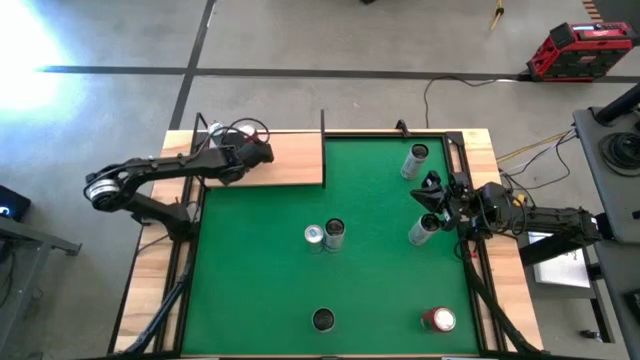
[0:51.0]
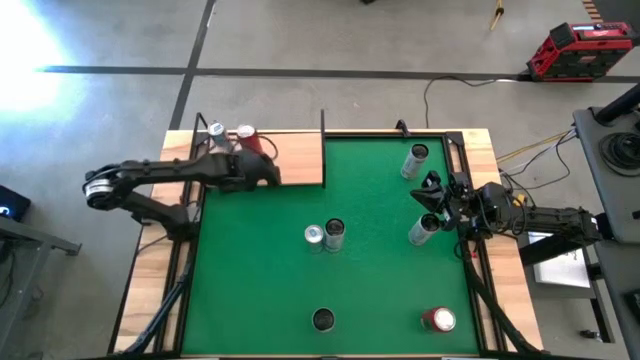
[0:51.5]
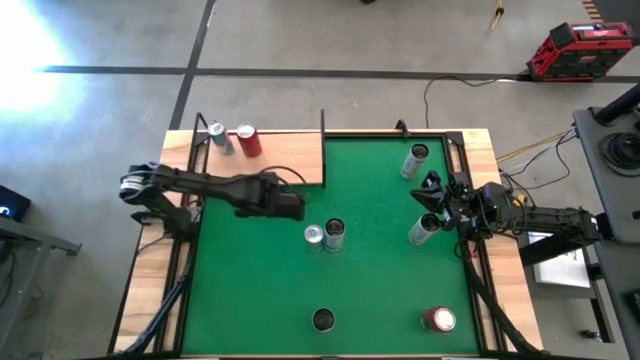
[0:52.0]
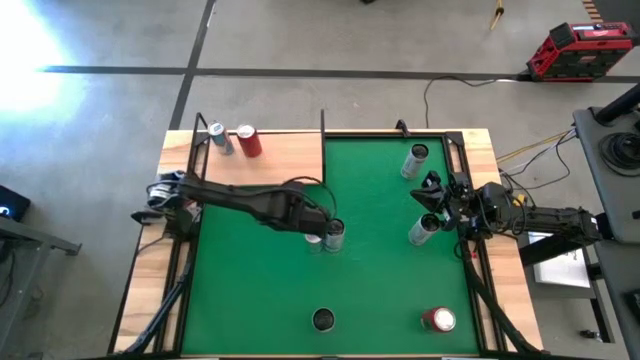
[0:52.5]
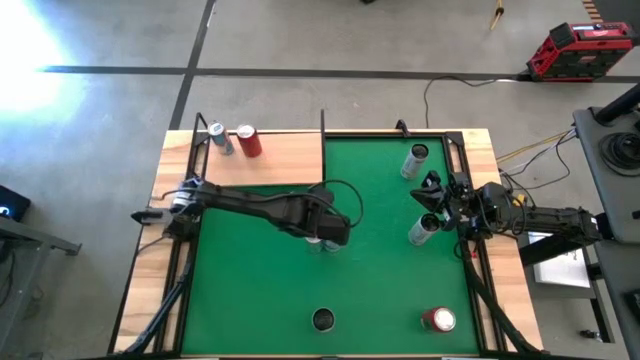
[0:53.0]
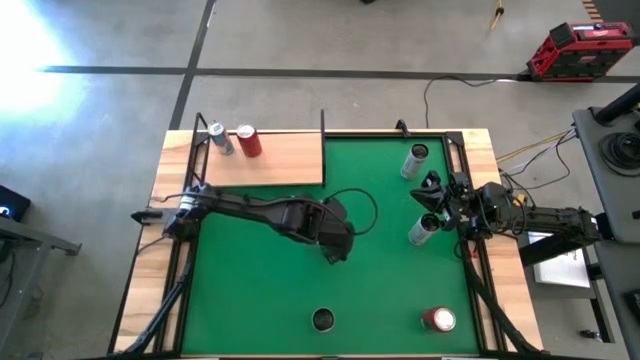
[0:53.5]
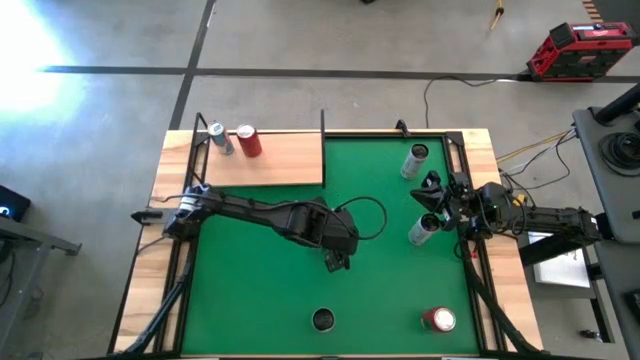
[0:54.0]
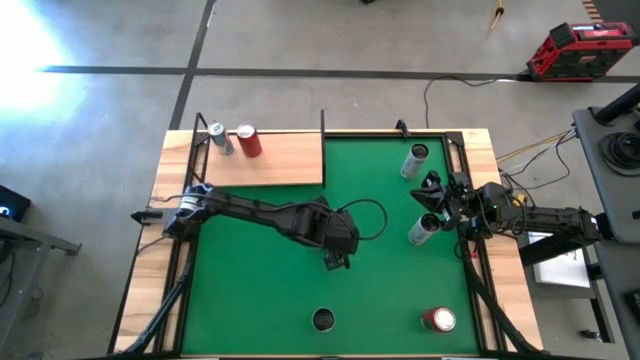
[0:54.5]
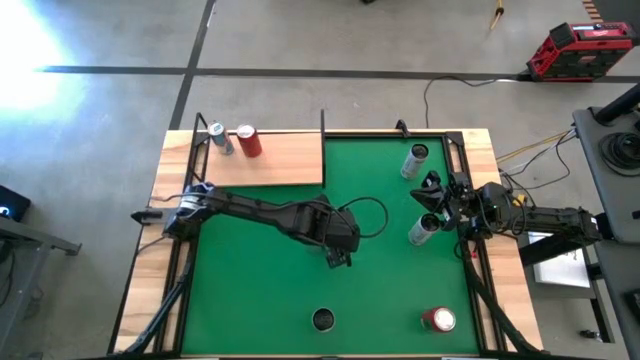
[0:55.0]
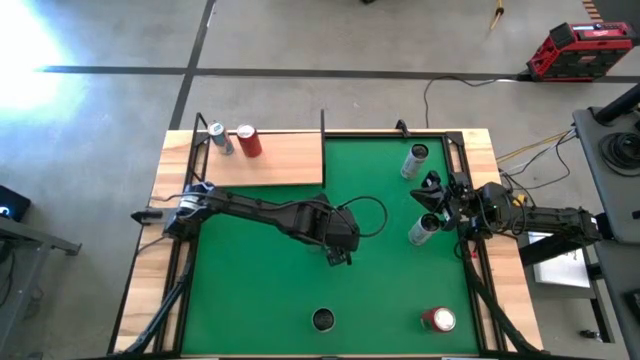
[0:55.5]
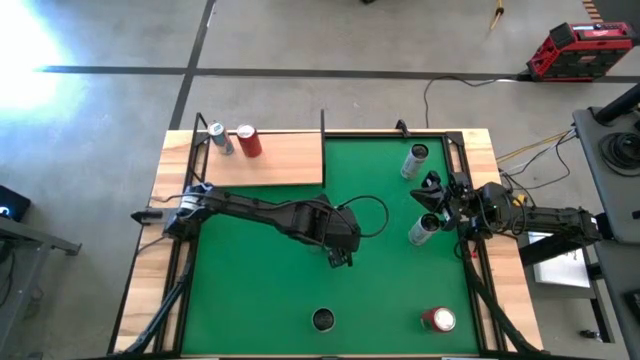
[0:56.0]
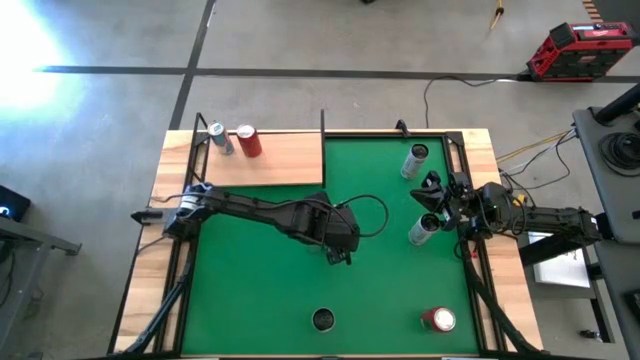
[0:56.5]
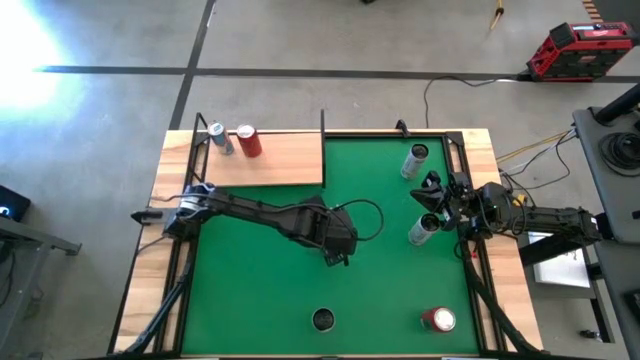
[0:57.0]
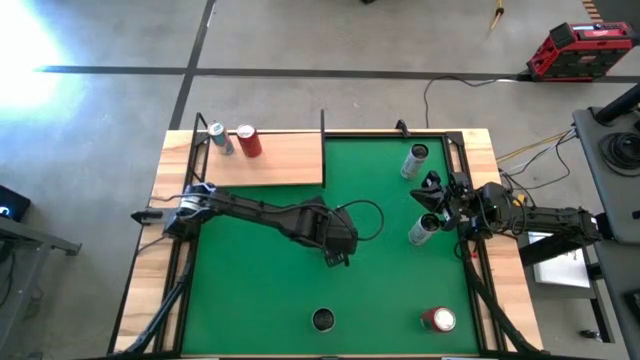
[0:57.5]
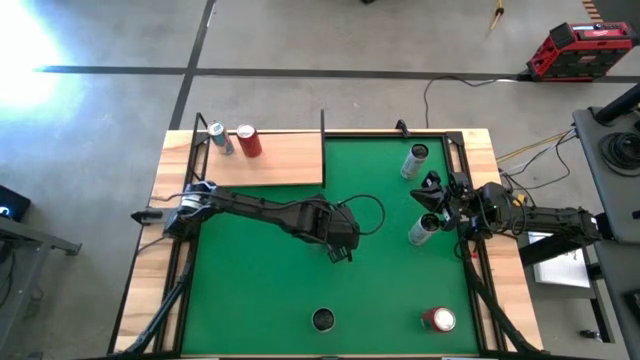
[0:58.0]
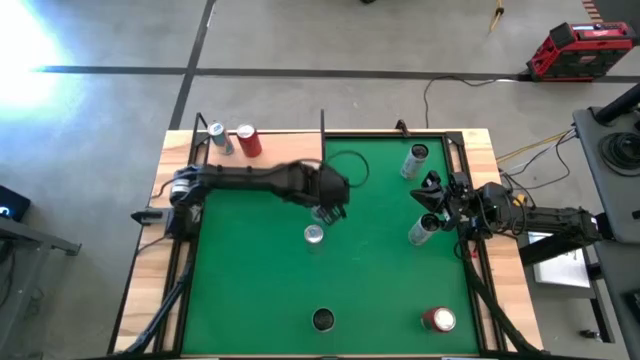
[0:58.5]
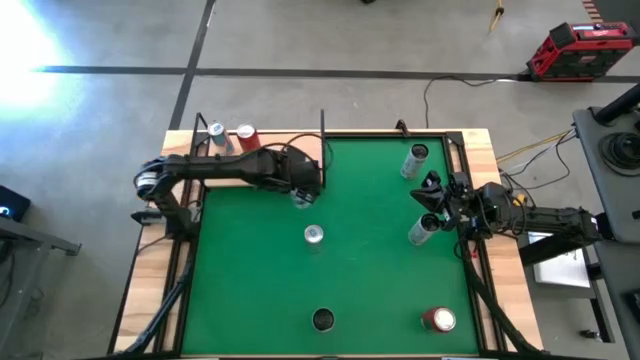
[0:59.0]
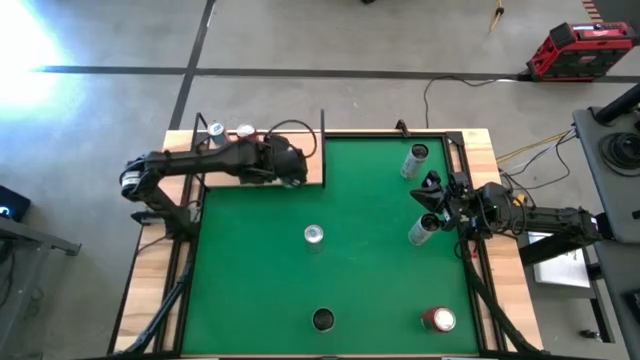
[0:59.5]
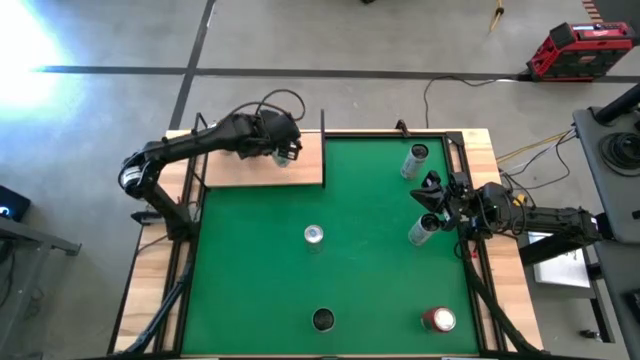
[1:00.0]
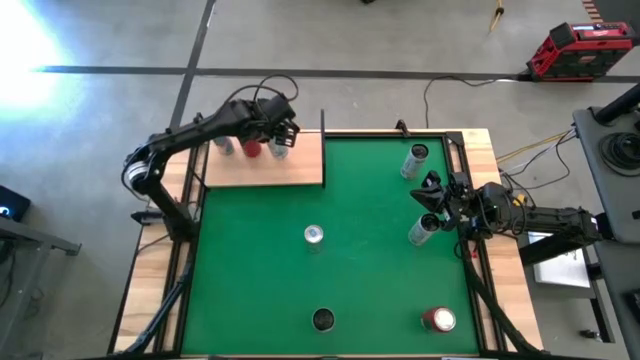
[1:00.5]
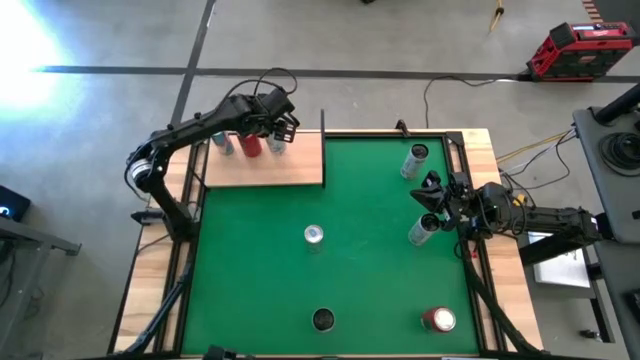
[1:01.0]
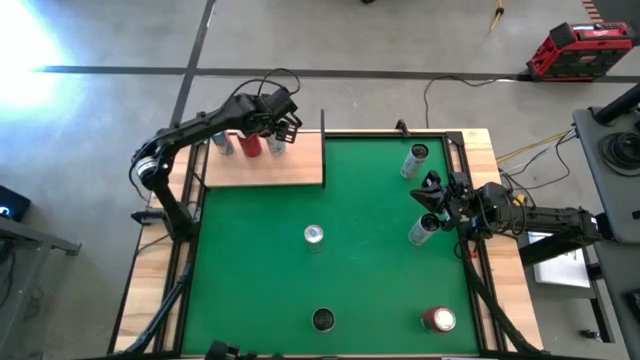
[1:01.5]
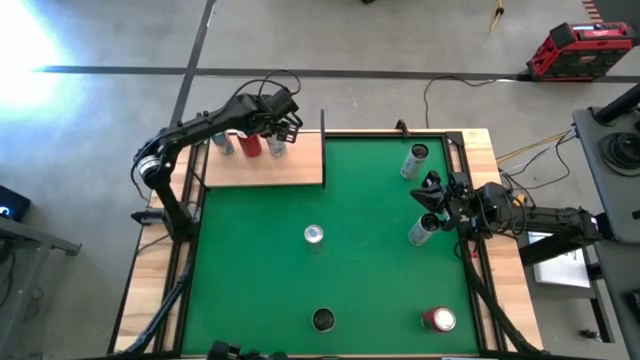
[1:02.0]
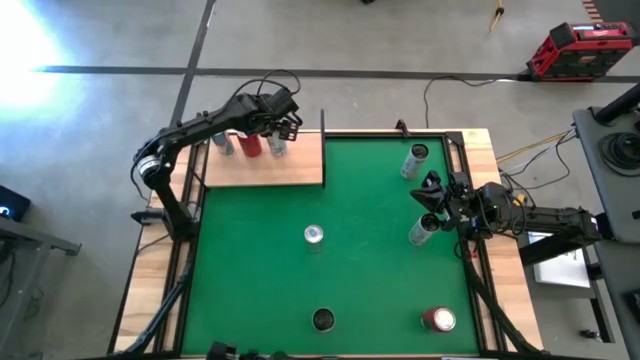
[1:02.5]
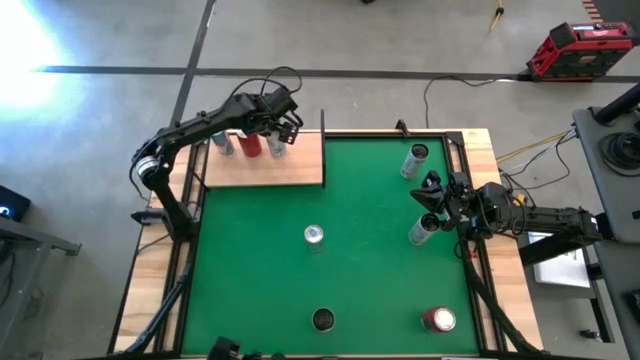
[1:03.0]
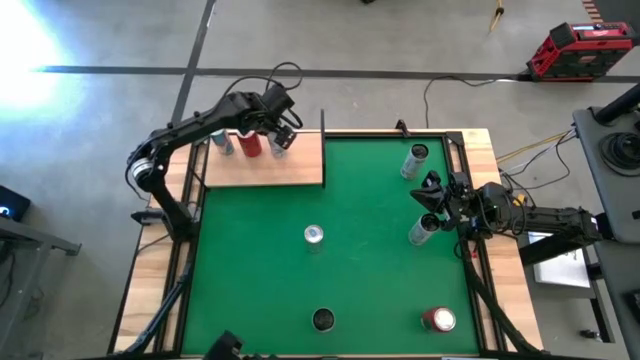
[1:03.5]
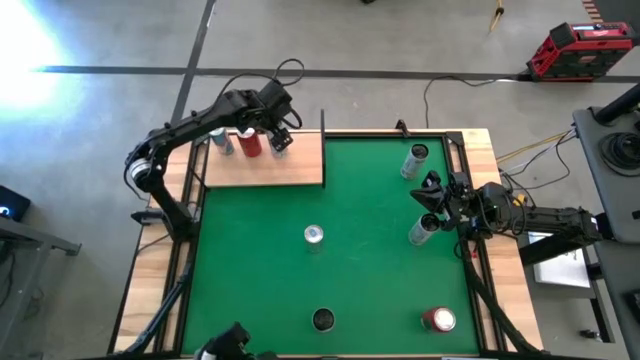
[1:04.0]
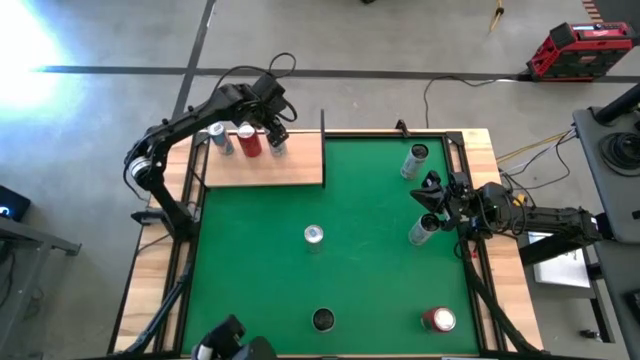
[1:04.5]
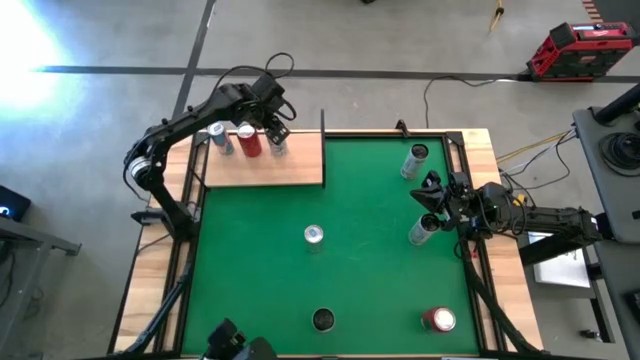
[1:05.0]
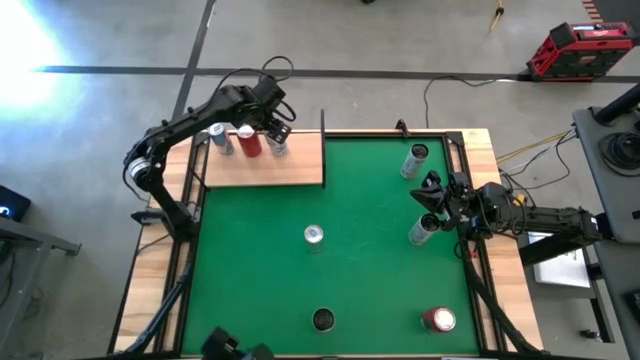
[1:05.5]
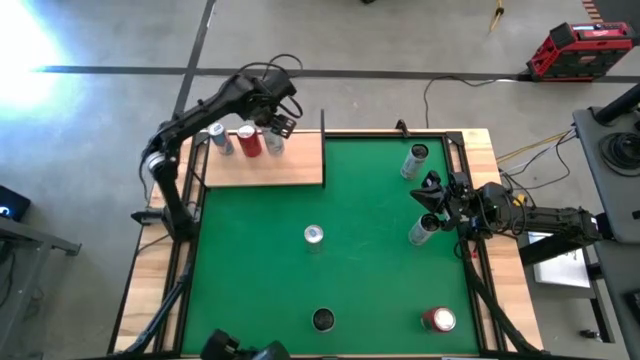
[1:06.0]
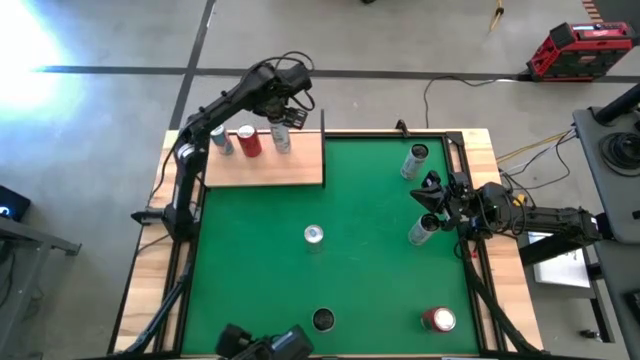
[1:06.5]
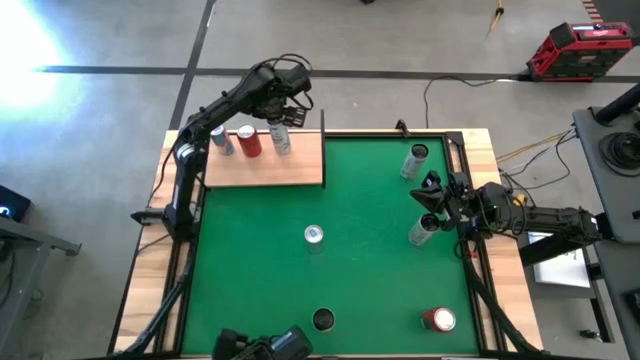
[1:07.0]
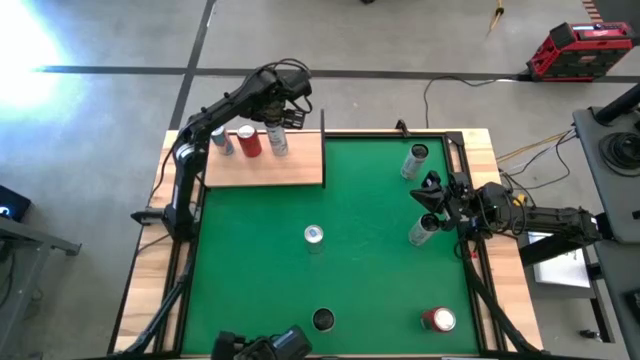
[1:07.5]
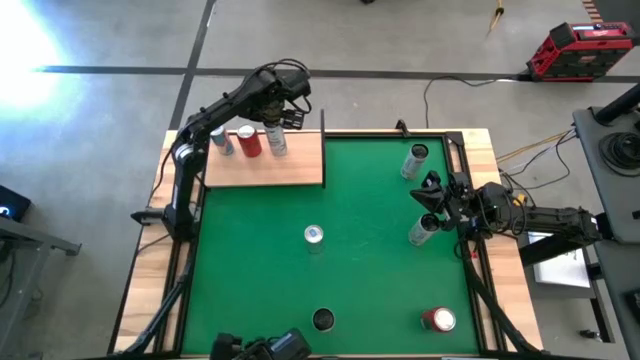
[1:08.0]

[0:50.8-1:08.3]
Task: Place canned beverage on shelf
Put the white blue soda can on the shelf

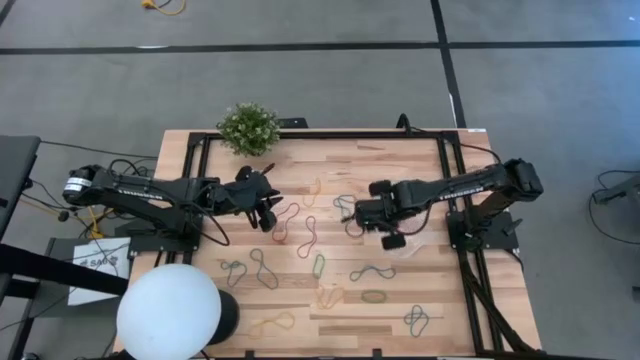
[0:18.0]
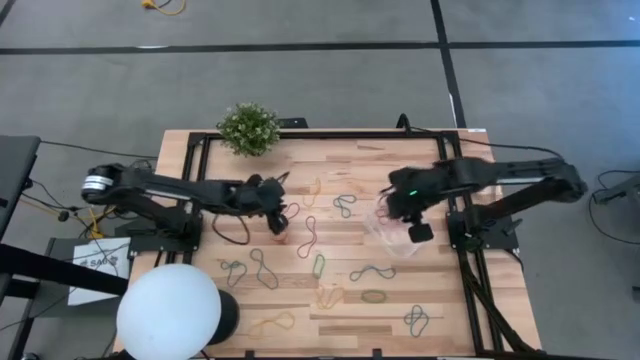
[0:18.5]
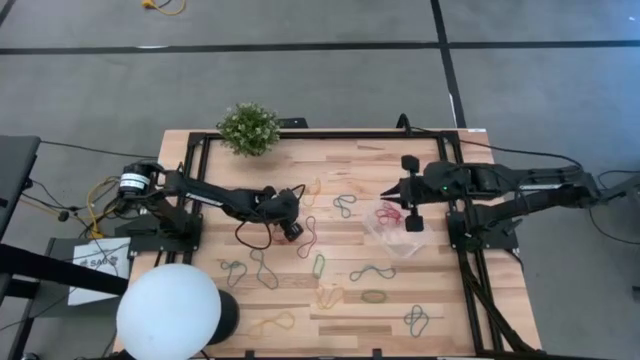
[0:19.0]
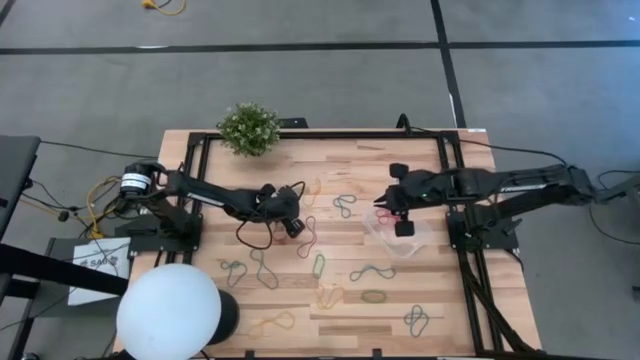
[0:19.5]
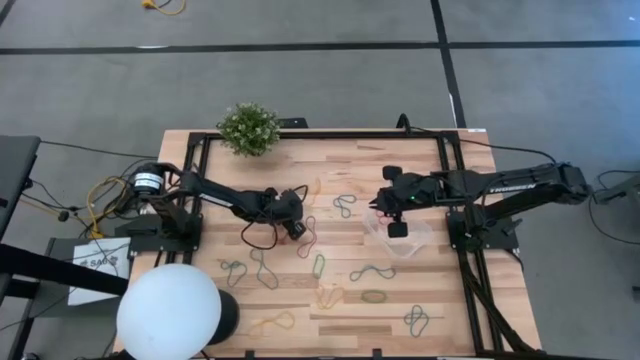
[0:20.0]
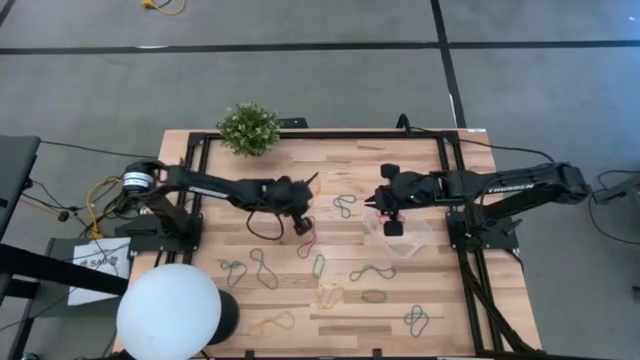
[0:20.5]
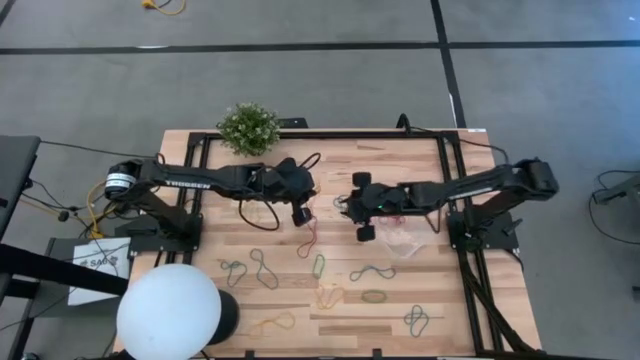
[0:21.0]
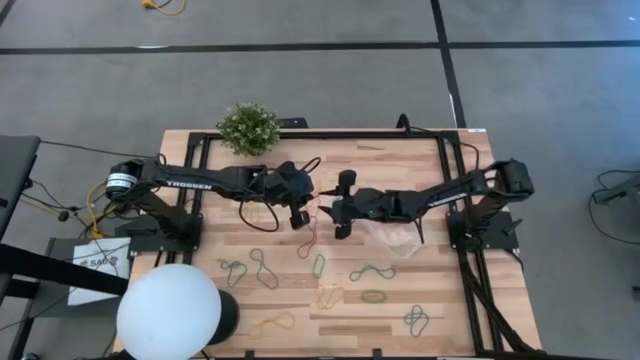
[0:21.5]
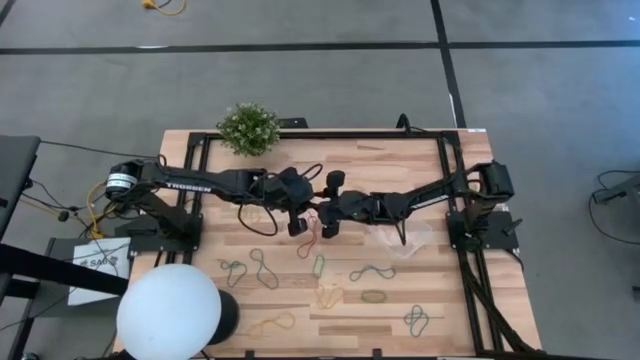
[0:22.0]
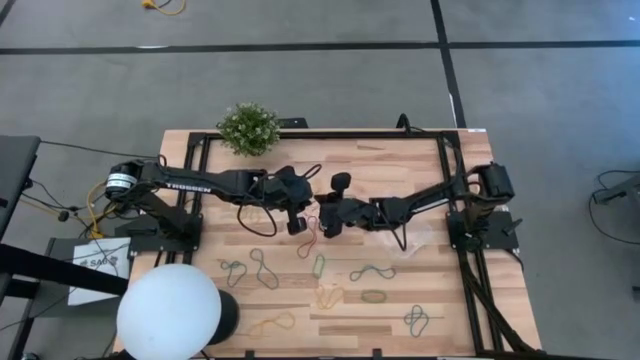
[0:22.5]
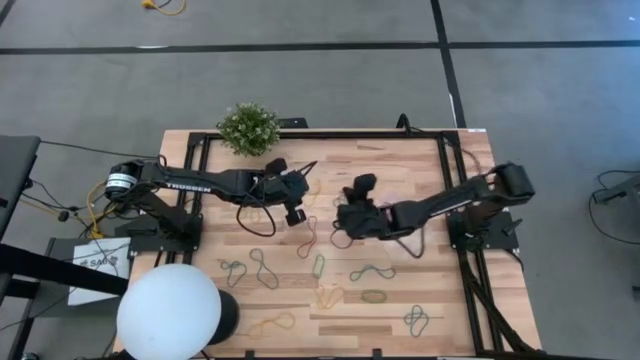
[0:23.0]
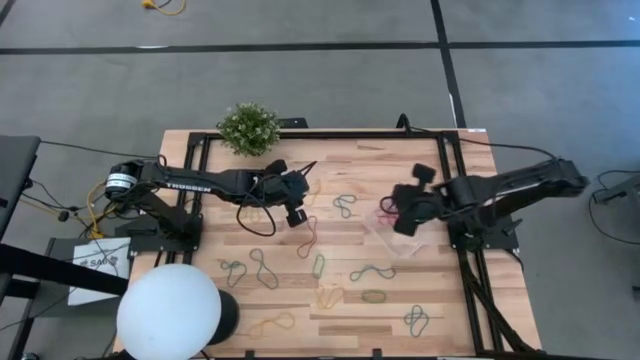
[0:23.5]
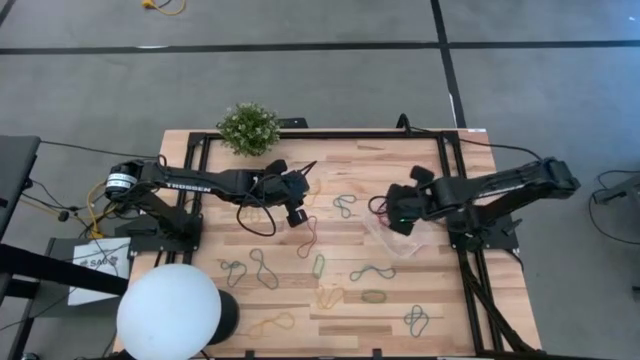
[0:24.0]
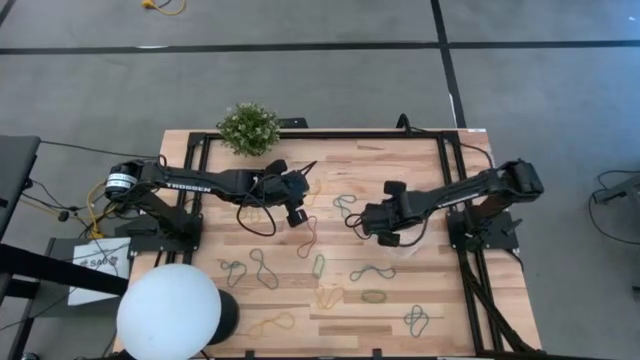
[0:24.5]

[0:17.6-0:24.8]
Task: Pick and place items into bin
Put the red rubber band into the transparent bin
